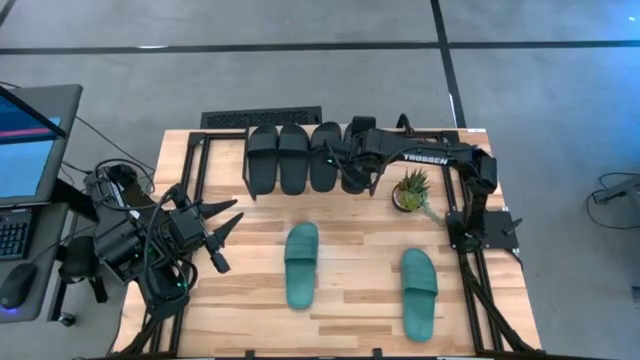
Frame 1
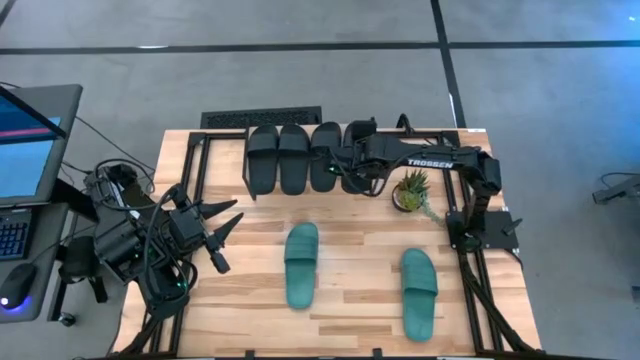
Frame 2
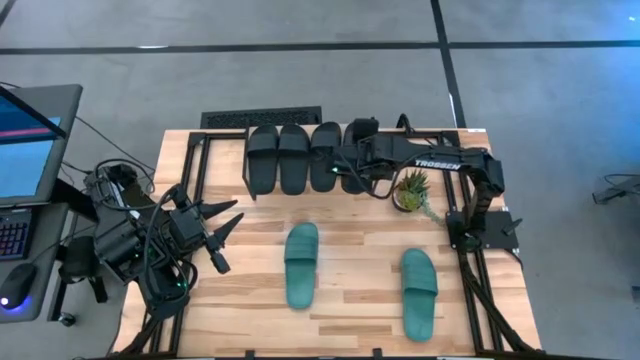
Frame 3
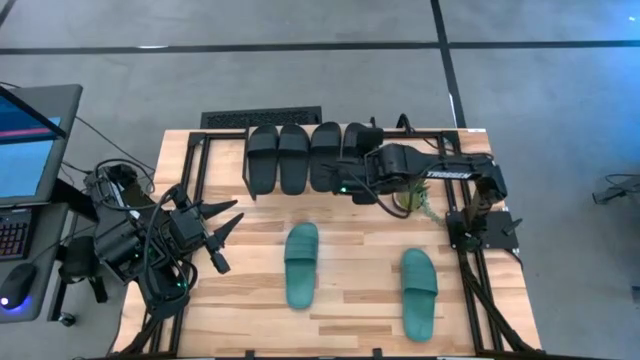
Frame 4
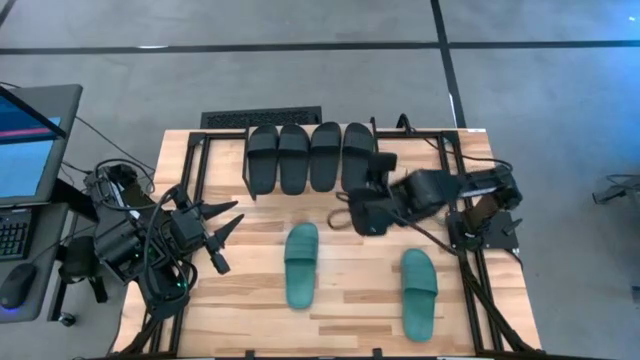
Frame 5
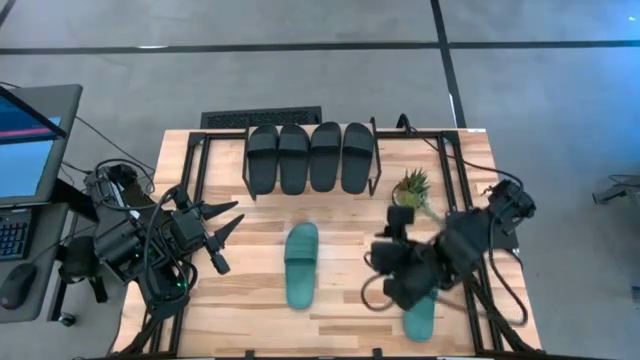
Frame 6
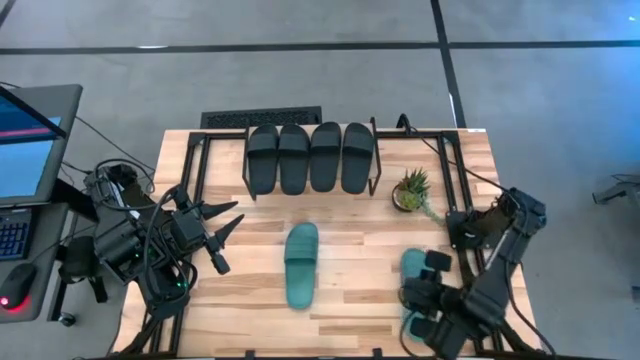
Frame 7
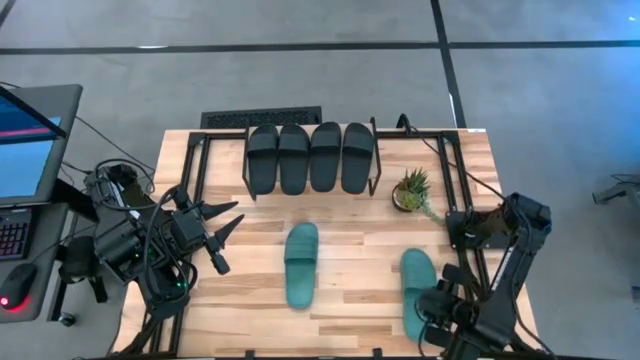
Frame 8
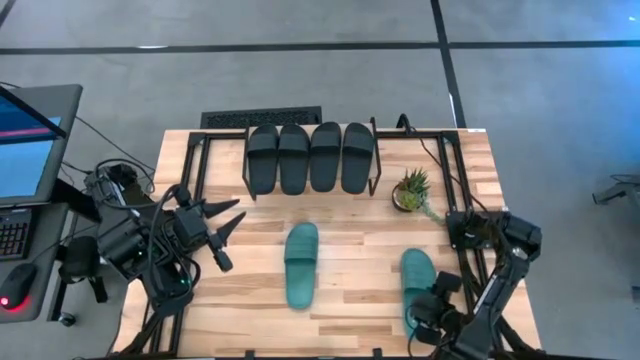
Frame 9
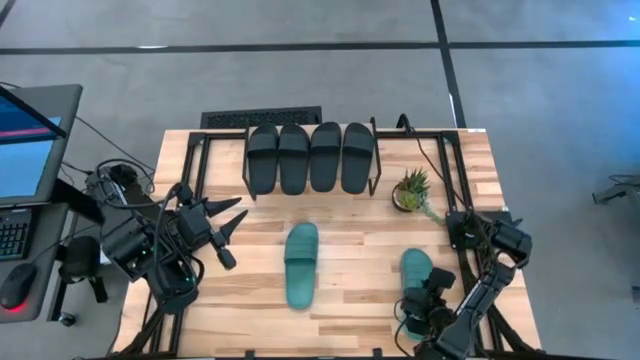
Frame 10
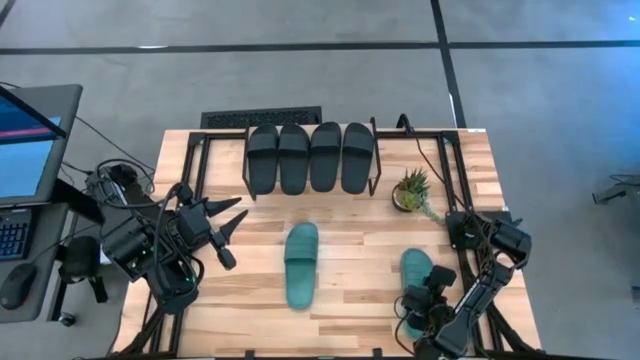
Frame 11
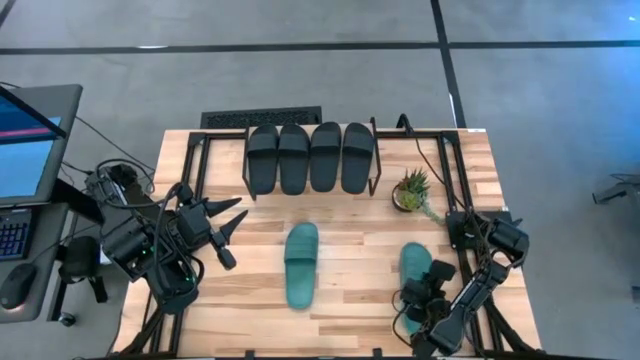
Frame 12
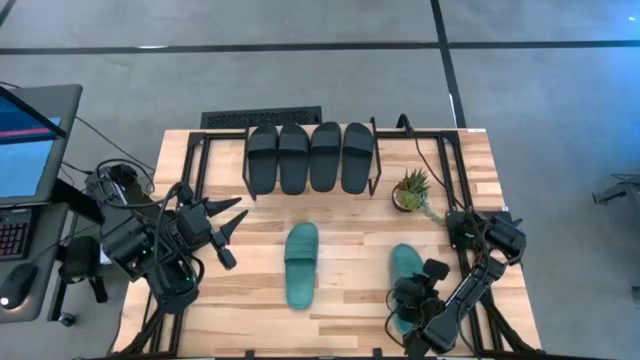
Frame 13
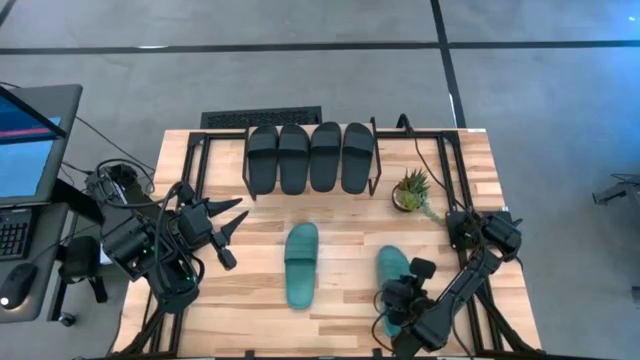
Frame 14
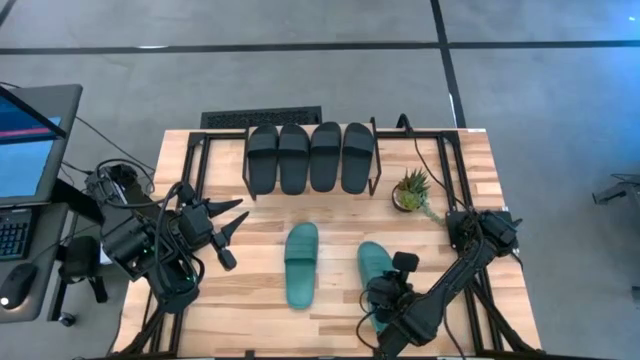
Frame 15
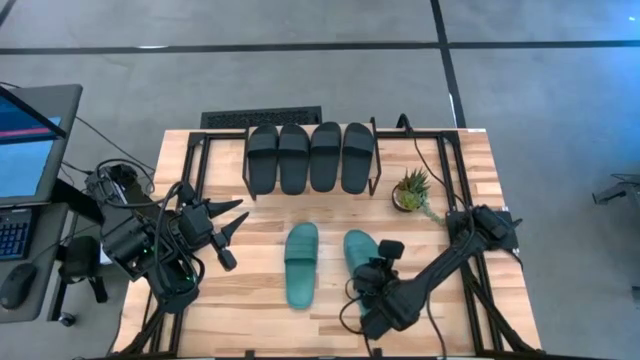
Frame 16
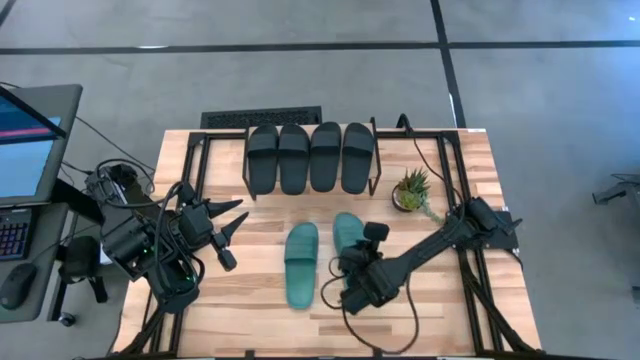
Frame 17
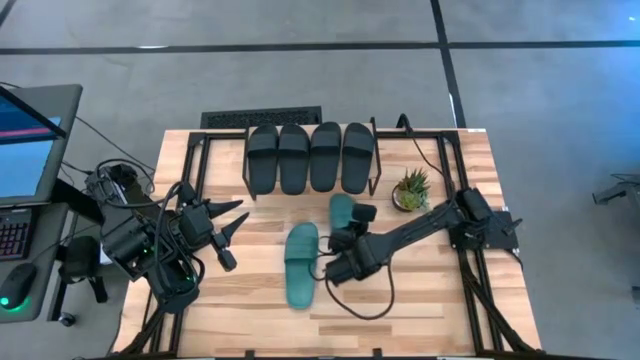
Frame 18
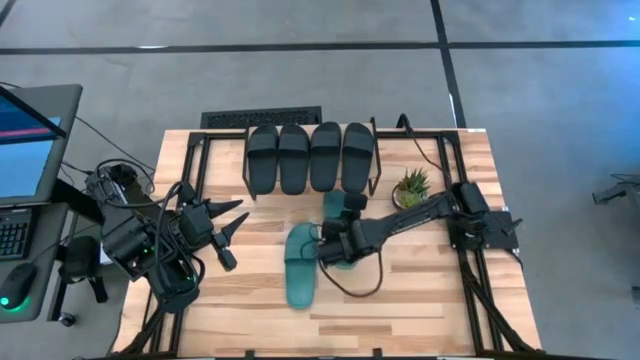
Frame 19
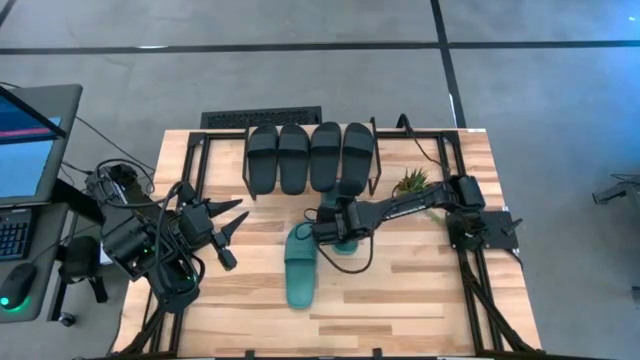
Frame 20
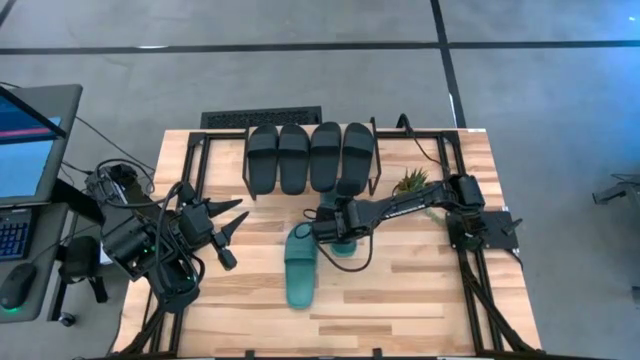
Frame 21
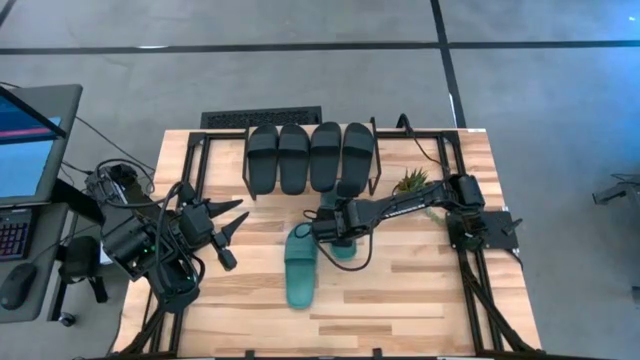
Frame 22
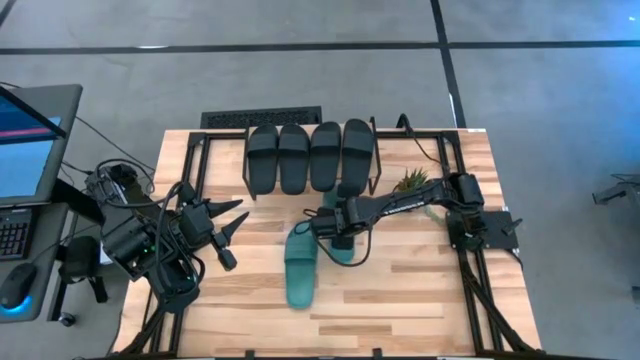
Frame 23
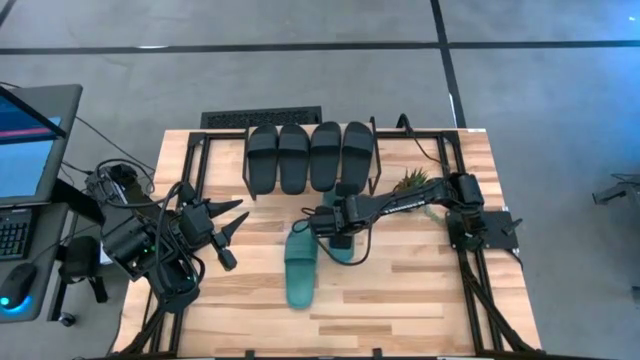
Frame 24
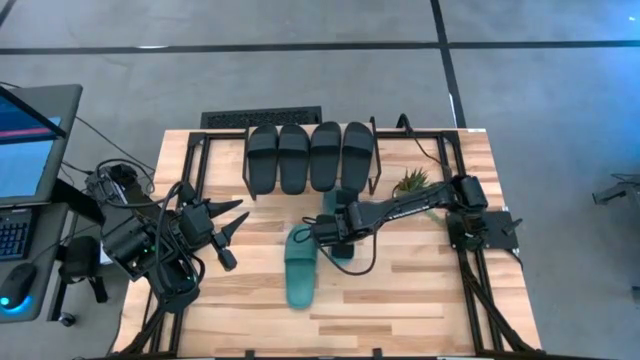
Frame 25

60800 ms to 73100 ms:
Task: Pick and place slides into the shelf
Put the green slipper under the shelf

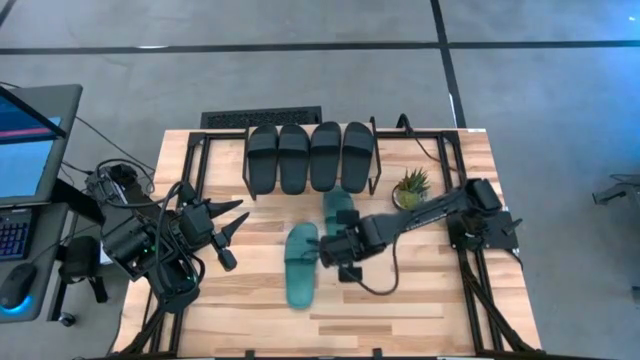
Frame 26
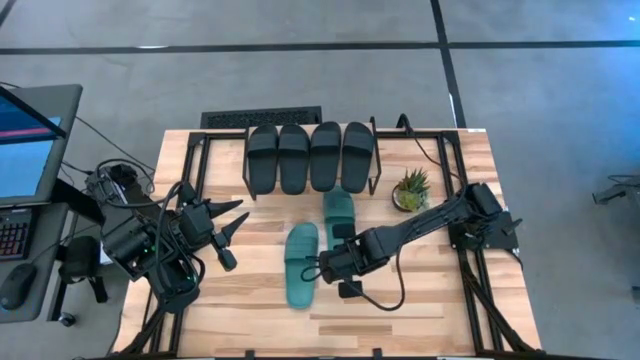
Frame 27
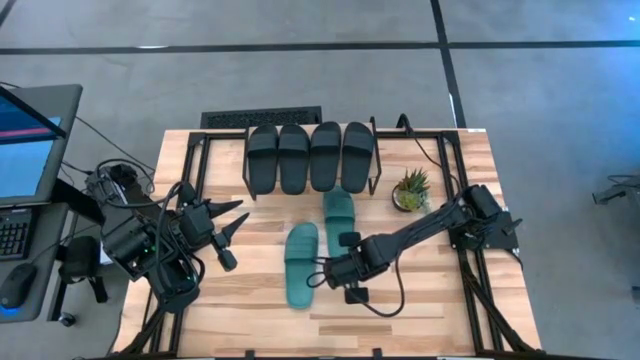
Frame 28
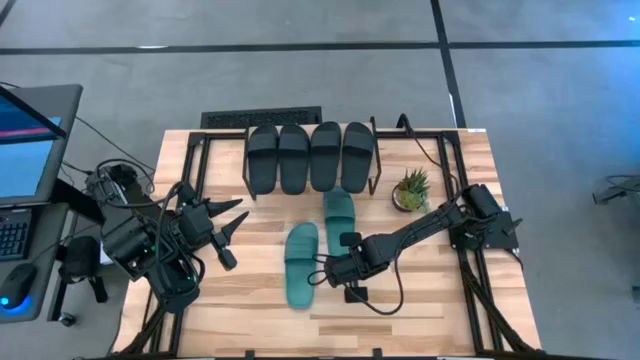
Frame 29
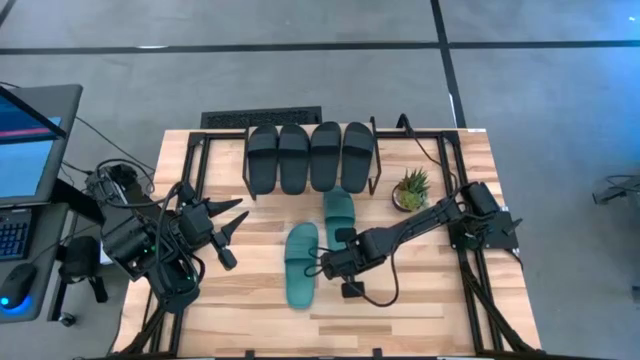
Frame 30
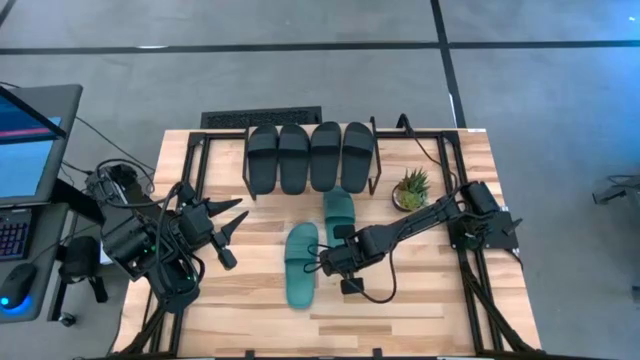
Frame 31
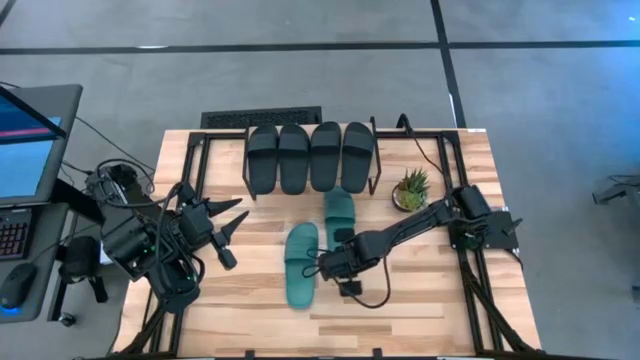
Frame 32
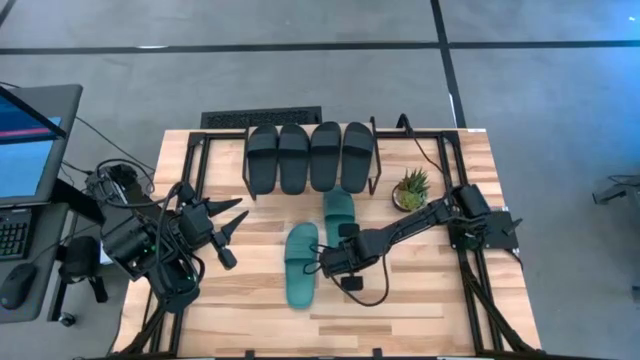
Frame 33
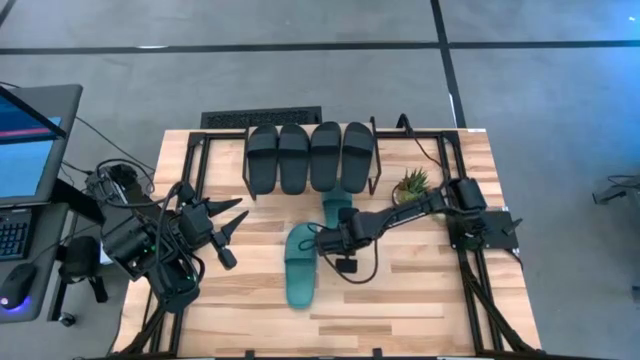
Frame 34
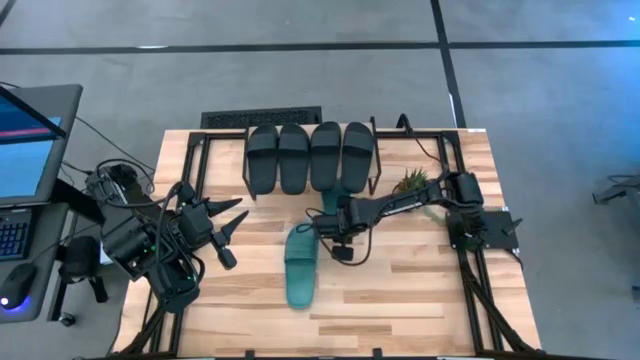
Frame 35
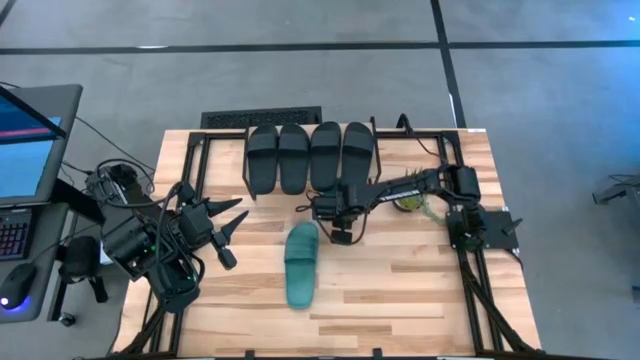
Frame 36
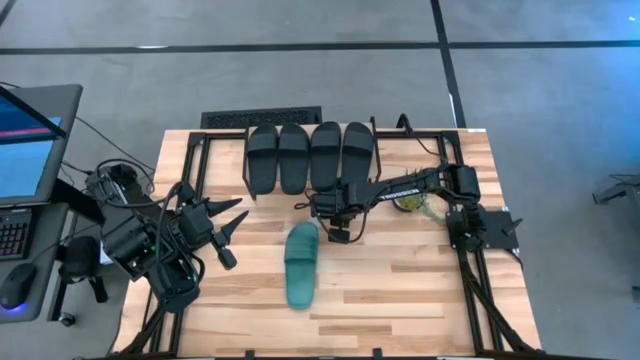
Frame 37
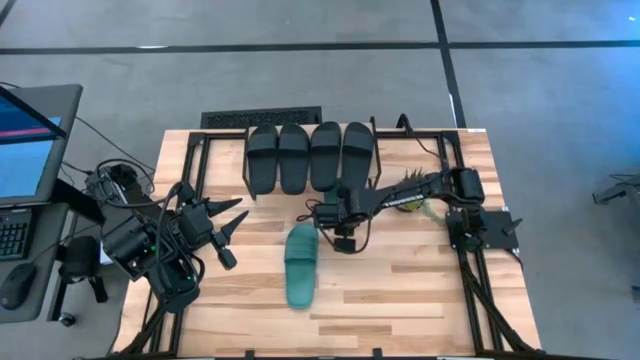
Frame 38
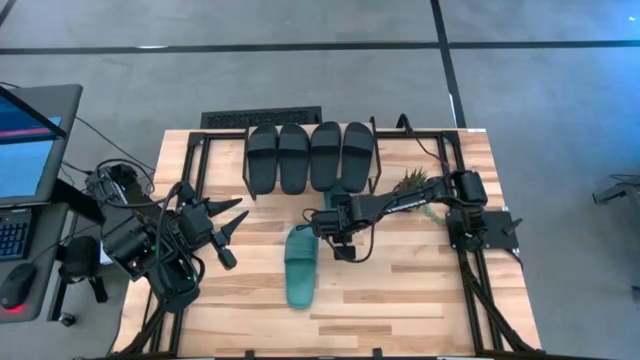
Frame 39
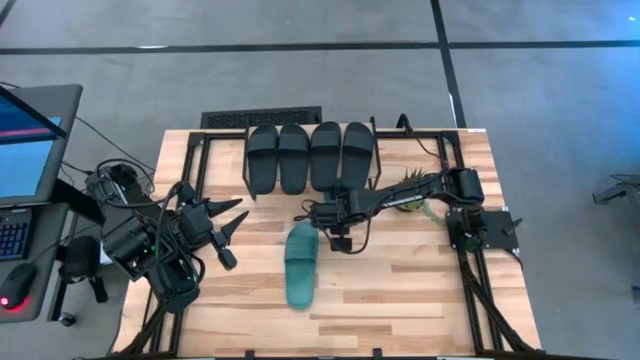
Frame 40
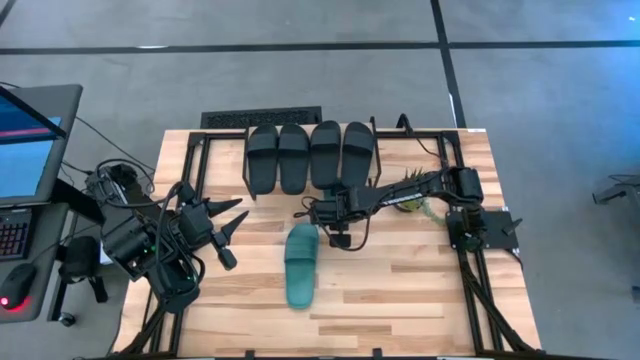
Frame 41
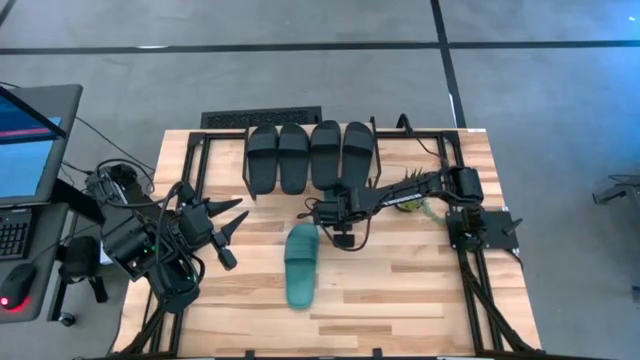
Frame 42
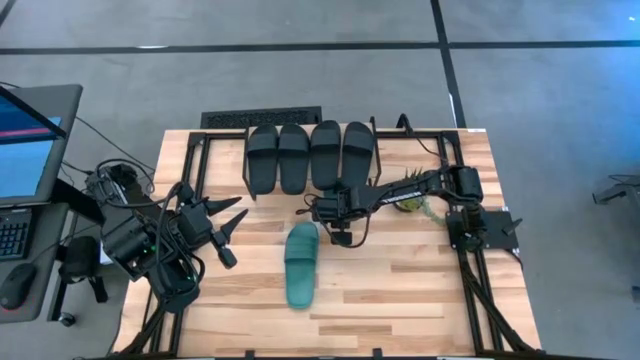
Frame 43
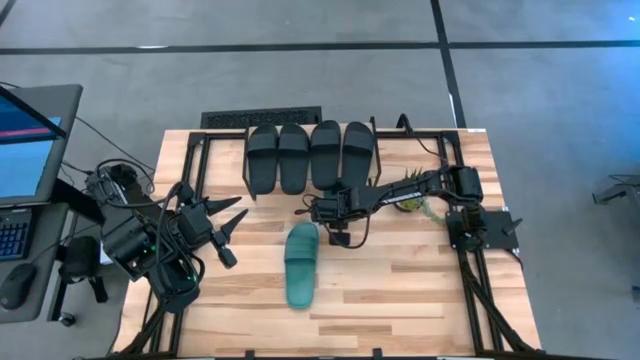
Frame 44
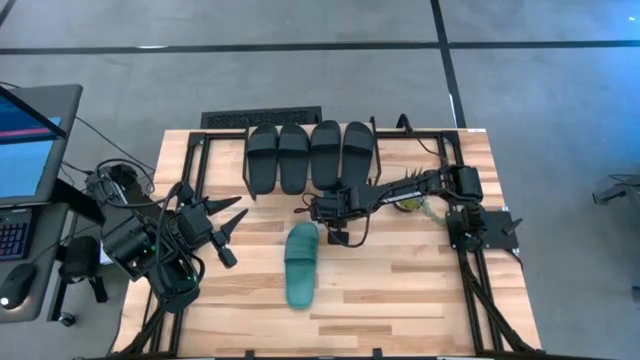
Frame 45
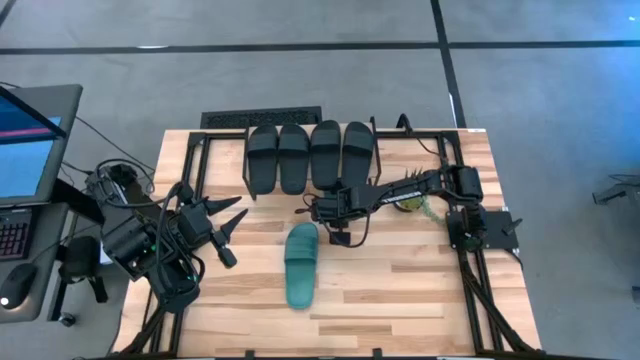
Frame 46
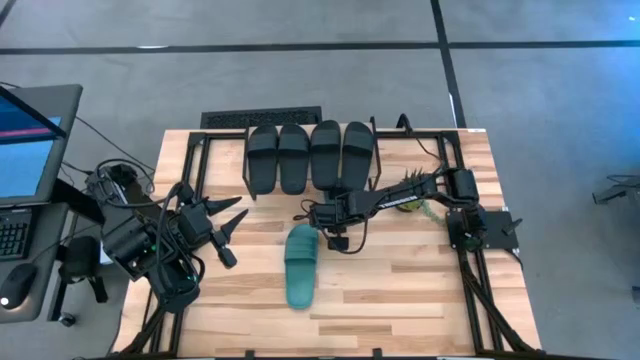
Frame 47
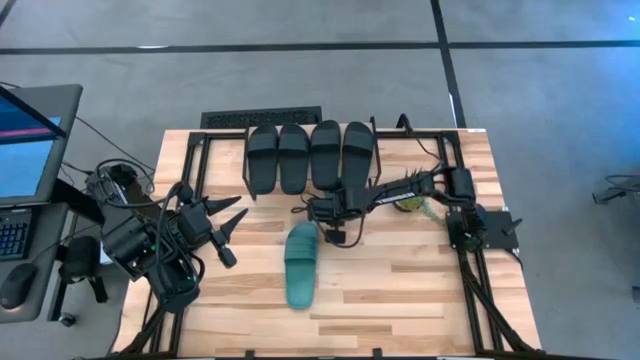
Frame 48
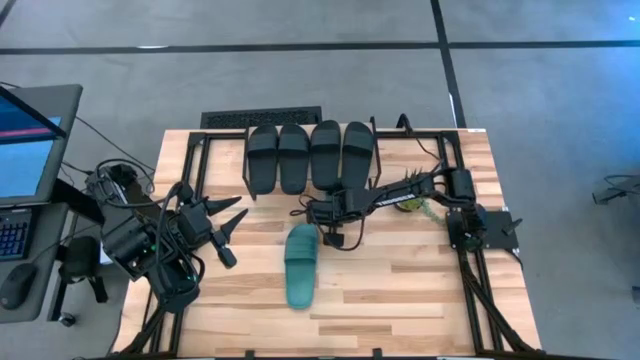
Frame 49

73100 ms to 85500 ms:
Put the green slipper under the shelf
